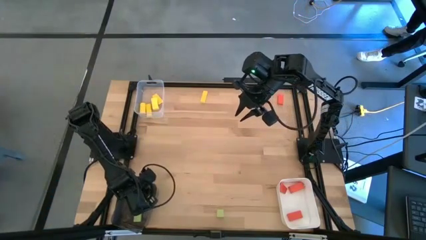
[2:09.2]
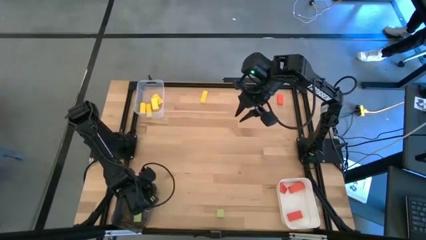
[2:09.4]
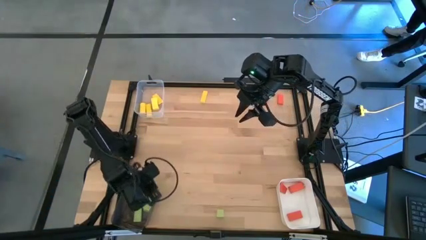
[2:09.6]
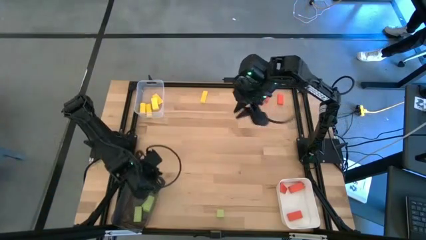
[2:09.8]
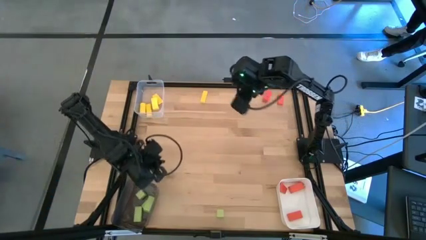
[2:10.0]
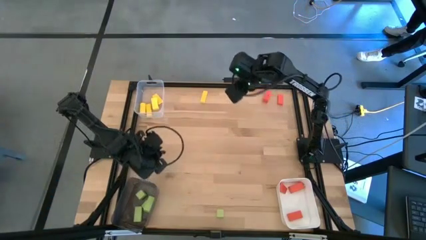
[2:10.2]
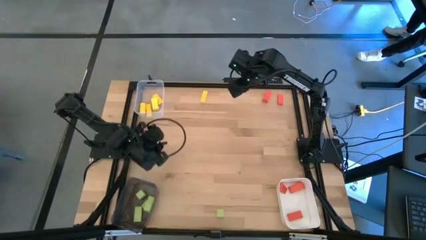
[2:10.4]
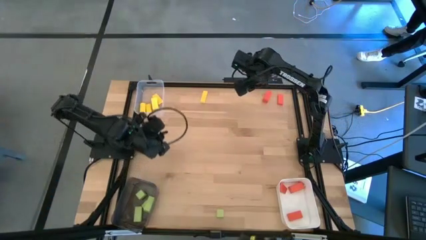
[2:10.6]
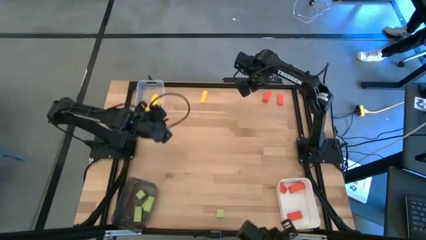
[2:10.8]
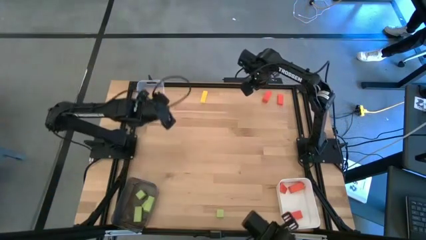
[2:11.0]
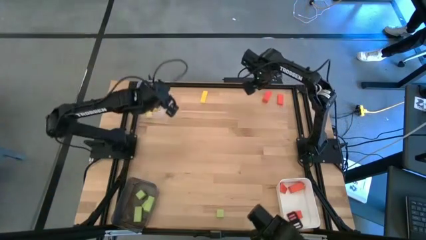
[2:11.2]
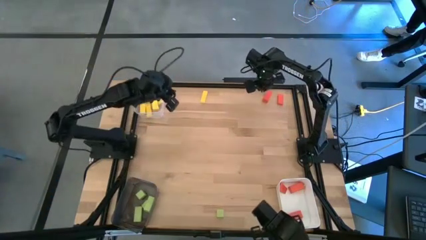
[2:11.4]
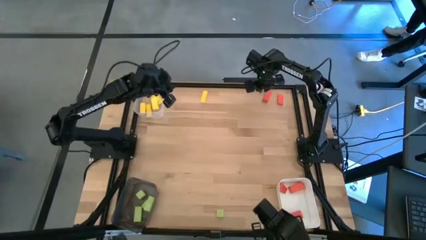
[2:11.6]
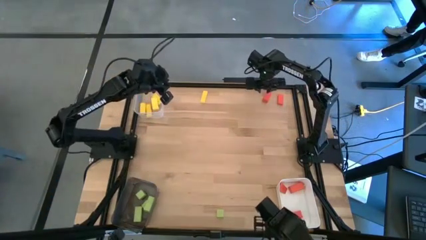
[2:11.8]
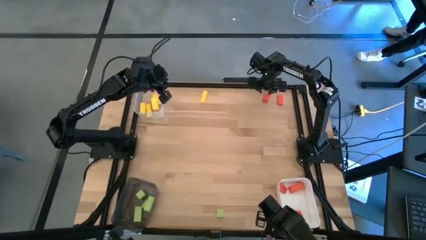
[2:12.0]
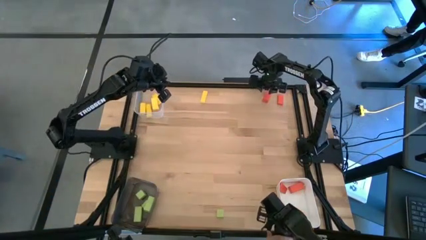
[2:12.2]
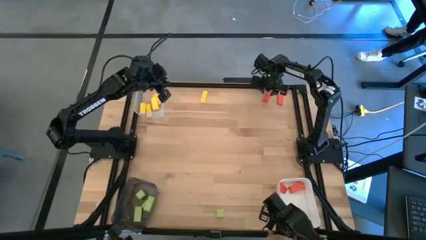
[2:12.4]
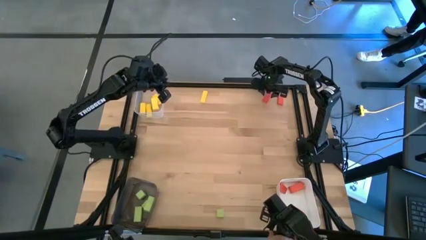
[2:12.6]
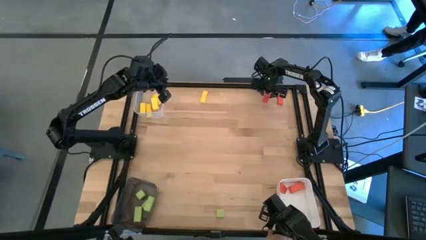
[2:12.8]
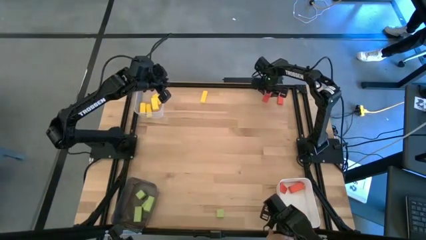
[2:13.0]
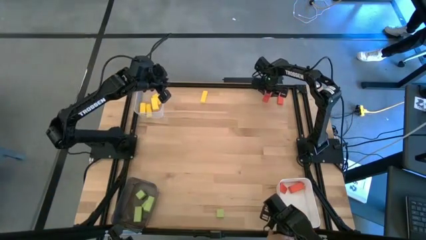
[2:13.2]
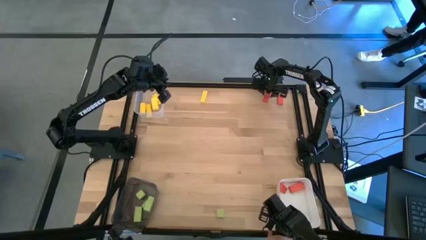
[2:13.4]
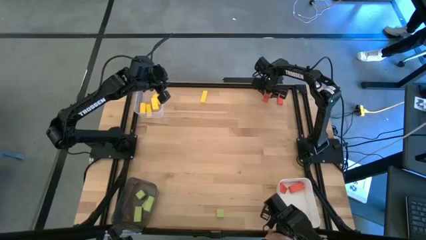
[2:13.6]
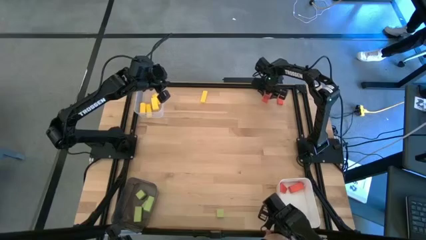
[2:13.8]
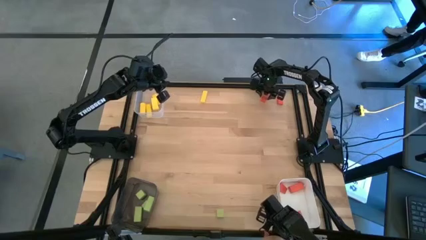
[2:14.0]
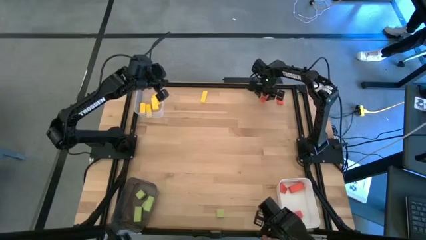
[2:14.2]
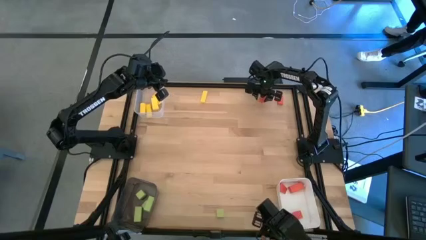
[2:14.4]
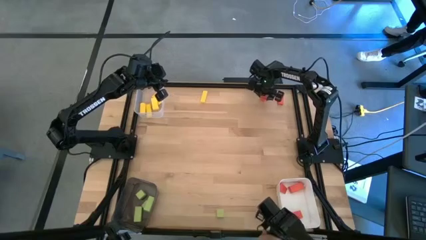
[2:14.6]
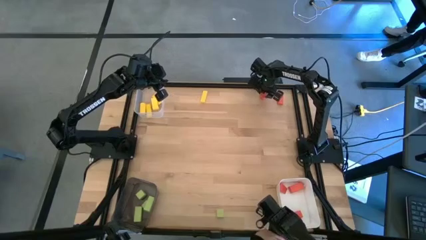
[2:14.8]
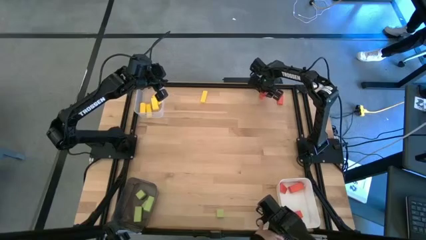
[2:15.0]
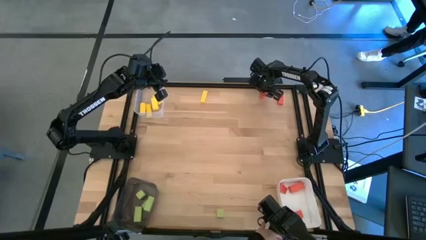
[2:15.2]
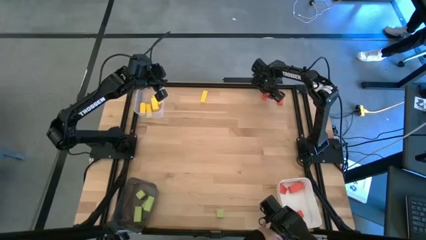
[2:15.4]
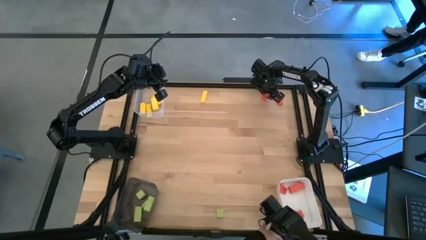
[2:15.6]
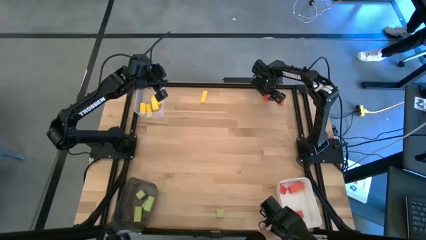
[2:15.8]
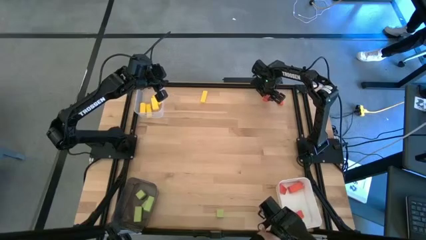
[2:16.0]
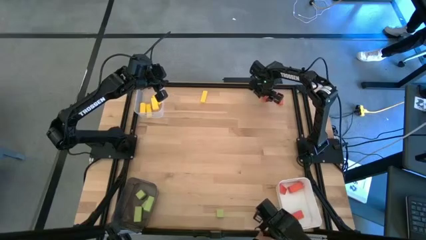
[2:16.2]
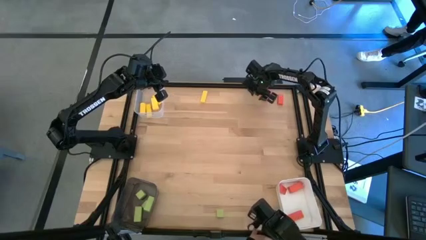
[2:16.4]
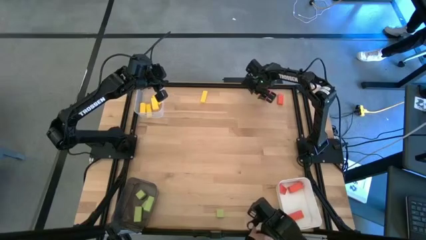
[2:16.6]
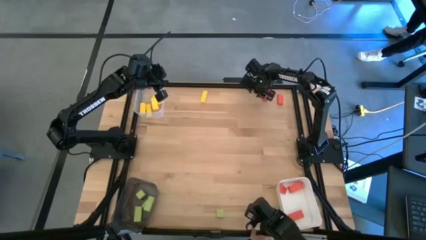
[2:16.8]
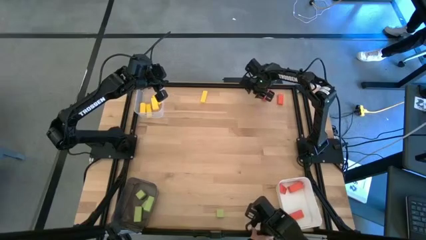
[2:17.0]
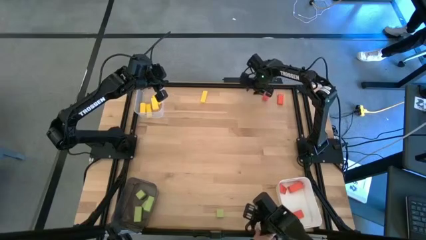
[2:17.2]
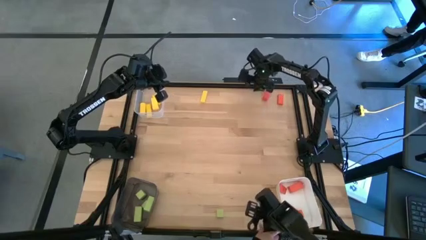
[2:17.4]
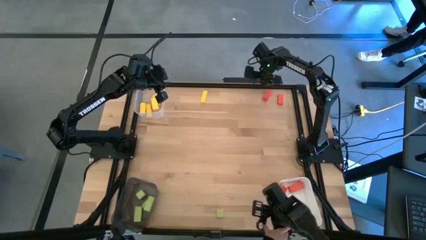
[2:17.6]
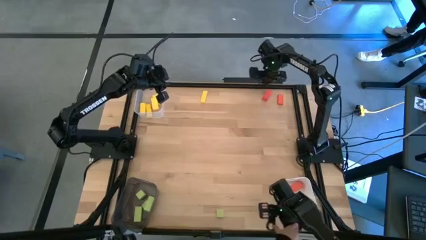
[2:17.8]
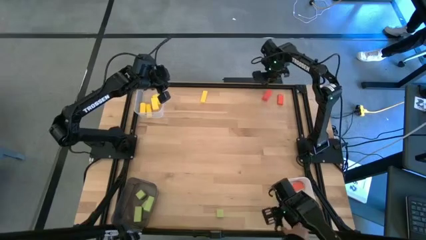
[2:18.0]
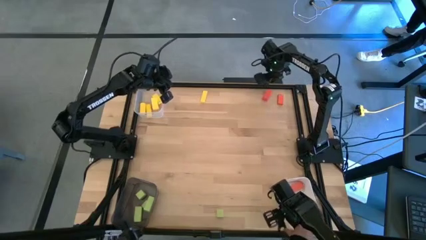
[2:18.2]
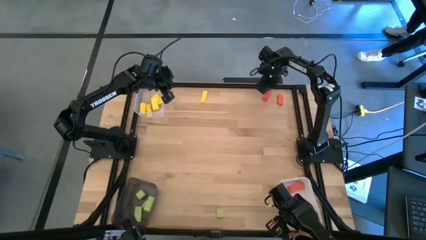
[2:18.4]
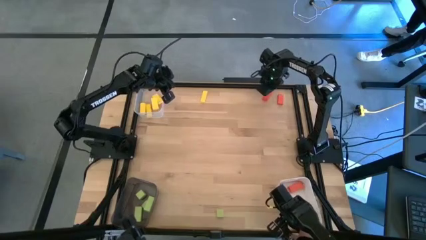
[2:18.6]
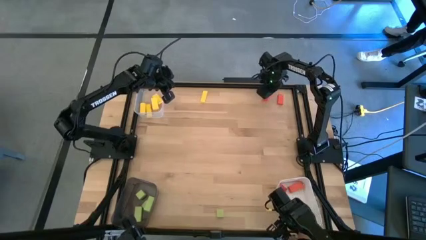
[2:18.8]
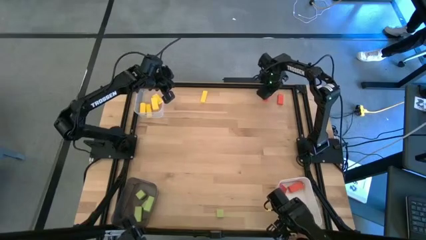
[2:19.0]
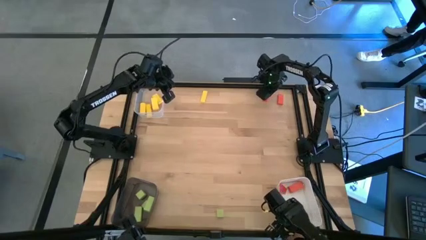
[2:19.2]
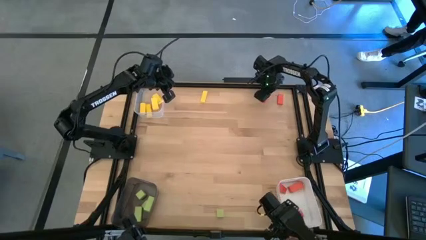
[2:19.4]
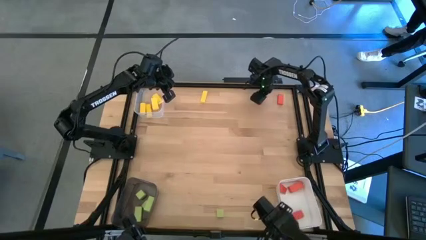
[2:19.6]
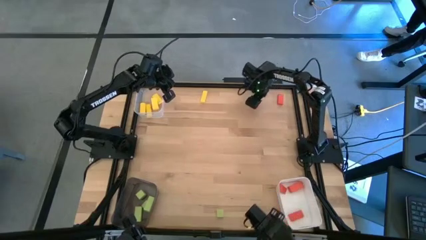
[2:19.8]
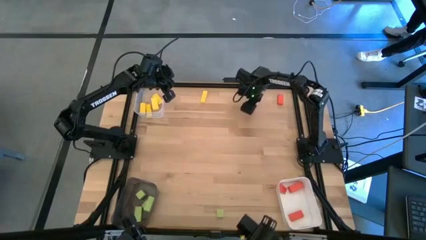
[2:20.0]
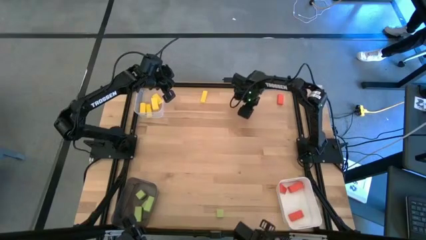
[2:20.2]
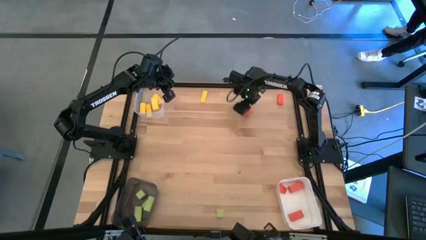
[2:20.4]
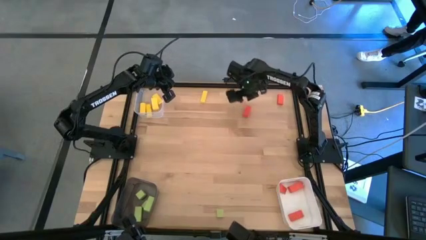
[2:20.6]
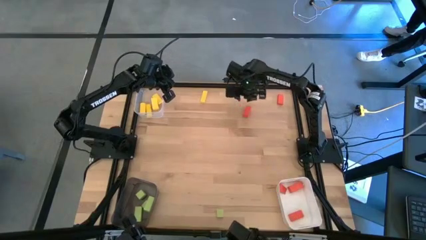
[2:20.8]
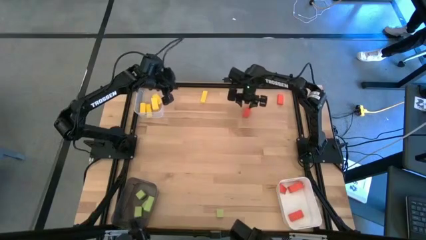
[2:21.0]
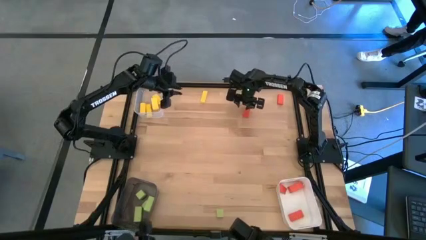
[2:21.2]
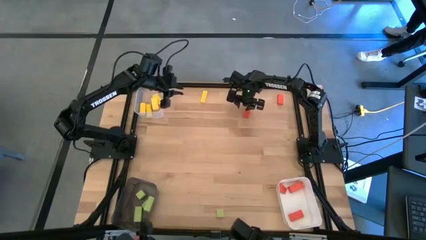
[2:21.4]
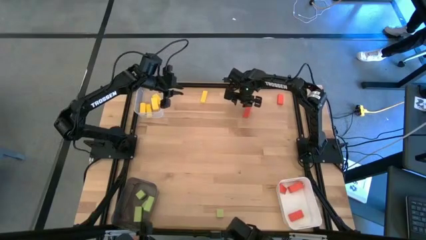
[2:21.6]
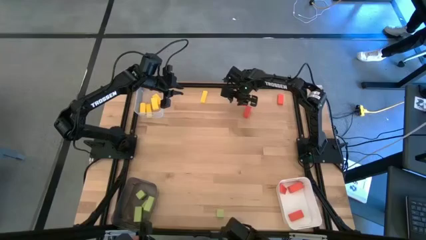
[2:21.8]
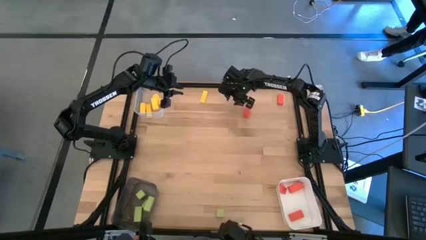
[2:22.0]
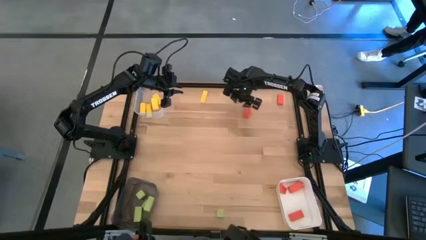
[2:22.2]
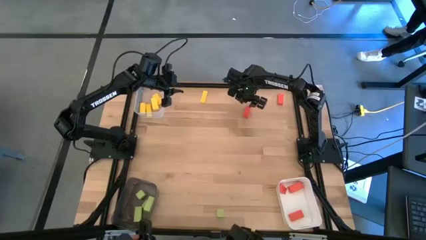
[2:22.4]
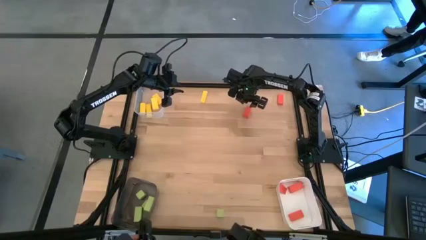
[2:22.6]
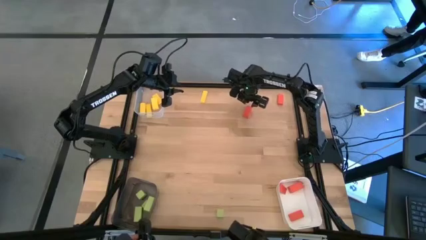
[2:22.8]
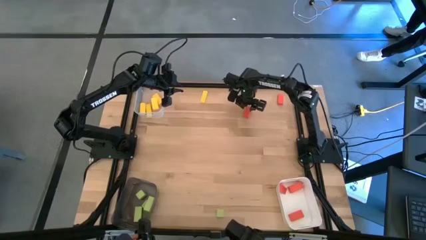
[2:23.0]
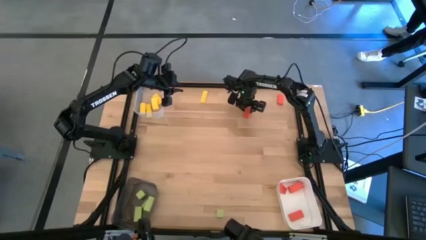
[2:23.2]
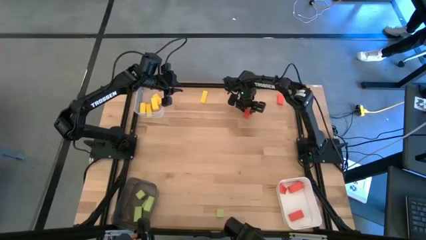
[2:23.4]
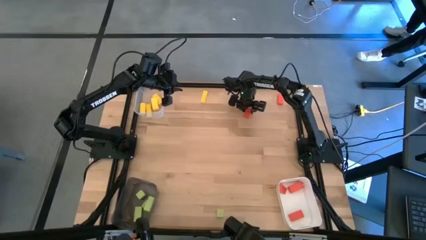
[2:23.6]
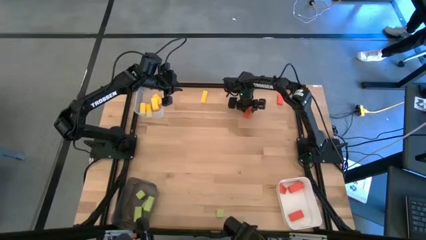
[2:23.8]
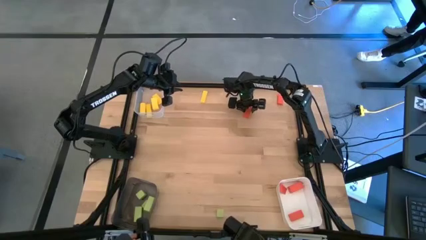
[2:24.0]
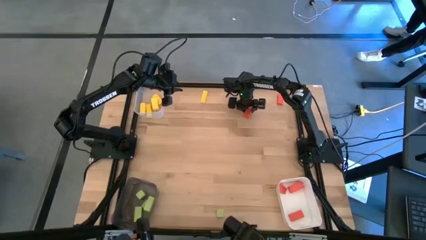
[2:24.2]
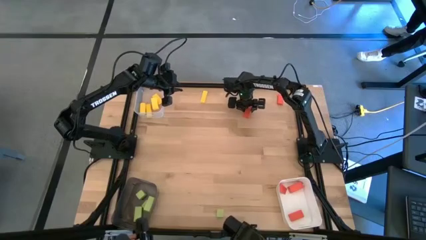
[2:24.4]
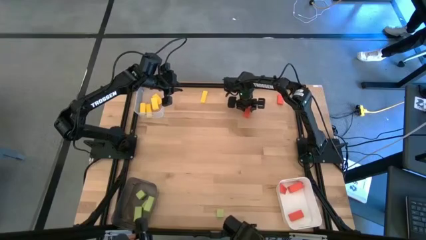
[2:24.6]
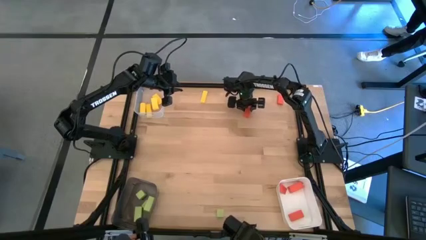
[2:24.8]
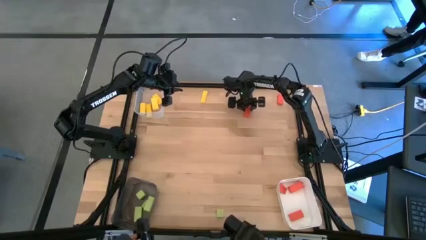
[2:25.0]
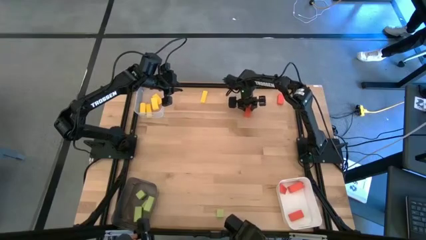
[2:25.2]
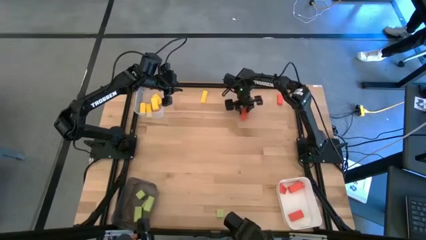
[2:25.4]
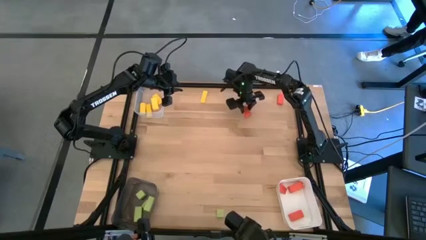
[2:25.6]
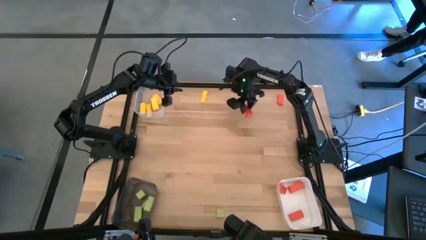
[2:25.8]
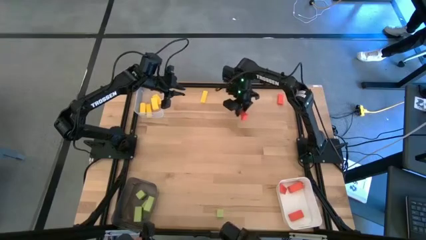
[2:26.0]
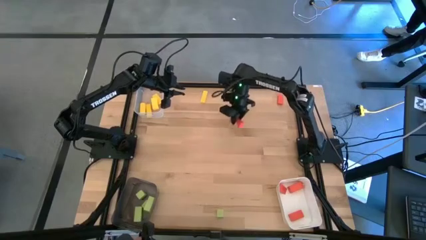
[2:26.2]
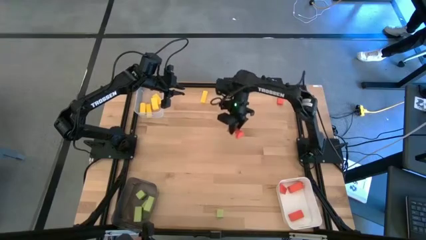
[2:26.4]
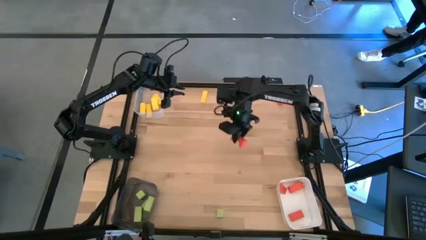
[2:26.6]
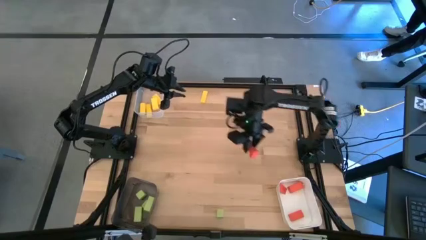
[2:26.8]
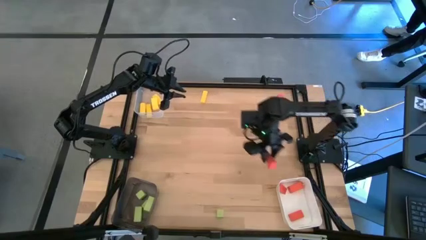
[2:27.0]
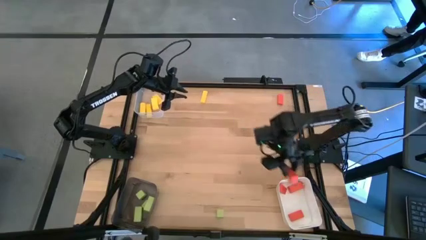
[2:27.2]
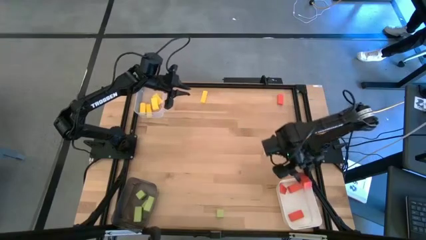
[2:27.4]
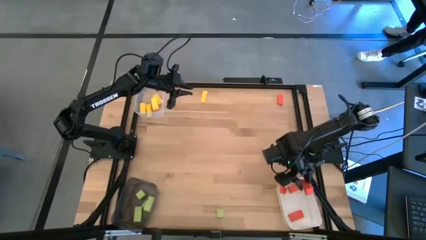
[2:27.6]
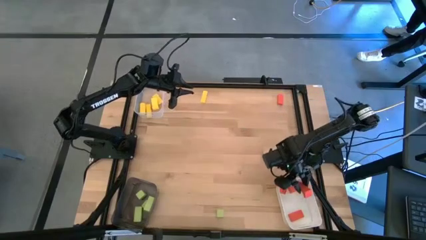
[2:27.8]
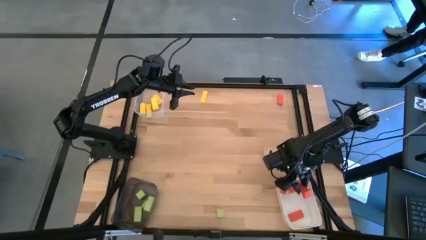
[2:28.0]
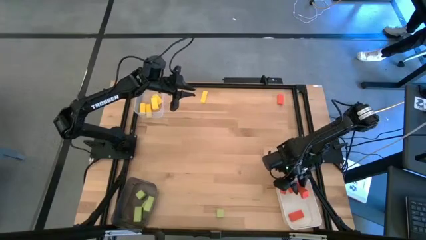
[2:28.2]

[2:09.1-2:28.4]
Task: Sort & place blocks by color
Put the orange block into the white bin
